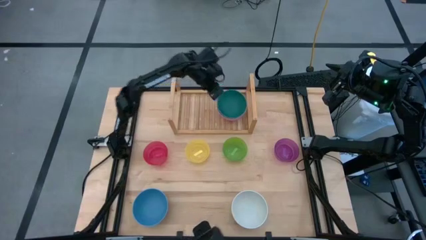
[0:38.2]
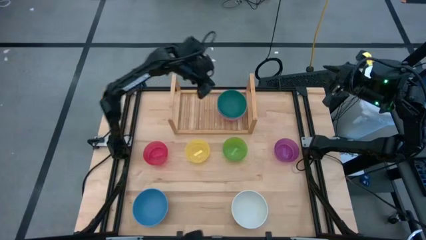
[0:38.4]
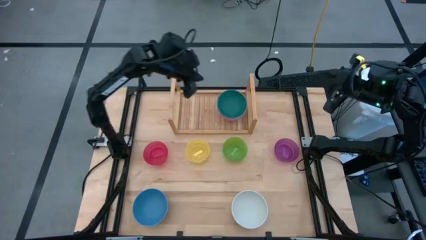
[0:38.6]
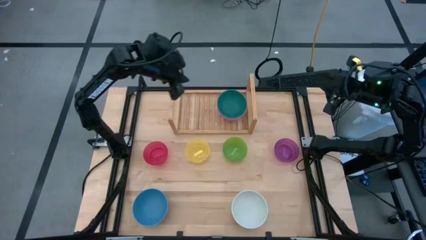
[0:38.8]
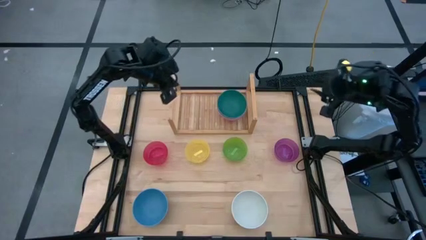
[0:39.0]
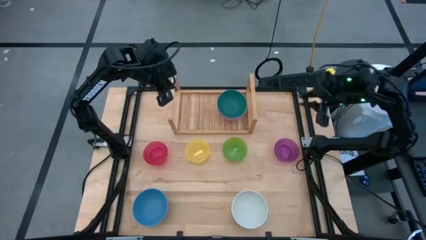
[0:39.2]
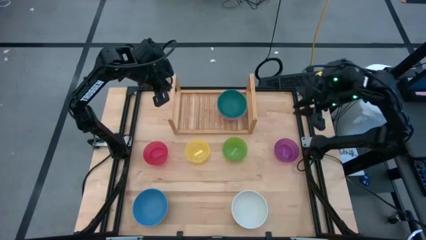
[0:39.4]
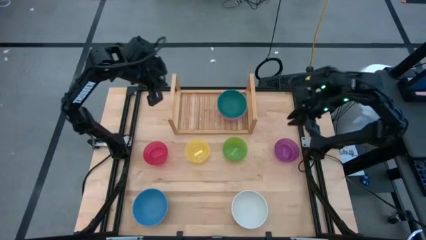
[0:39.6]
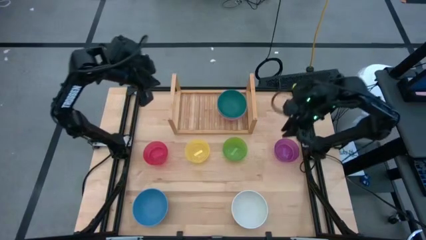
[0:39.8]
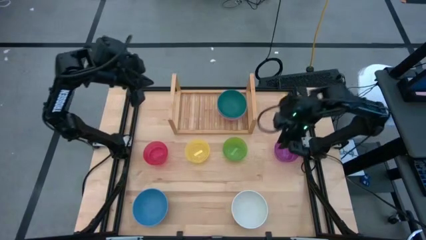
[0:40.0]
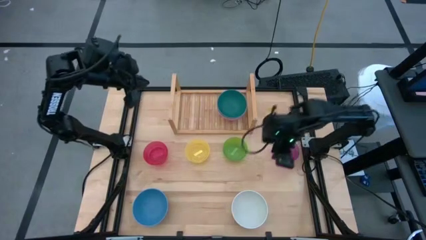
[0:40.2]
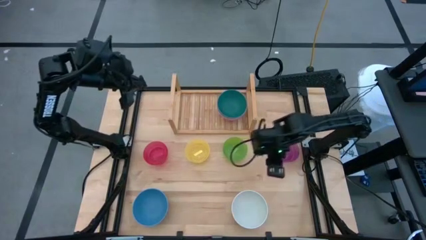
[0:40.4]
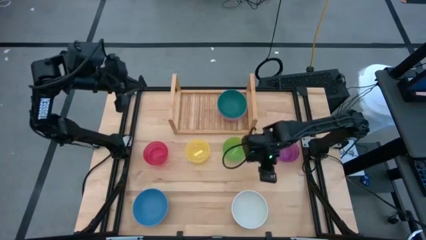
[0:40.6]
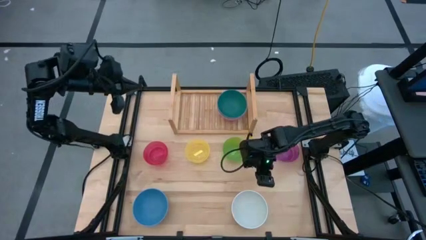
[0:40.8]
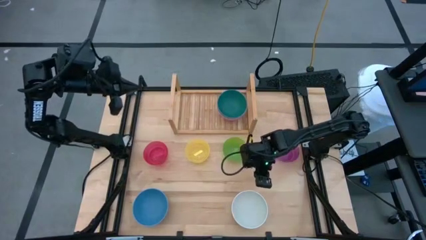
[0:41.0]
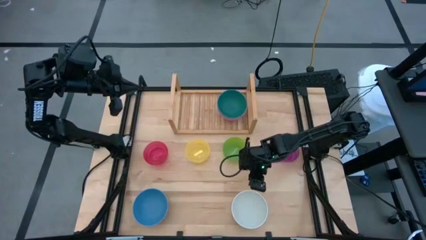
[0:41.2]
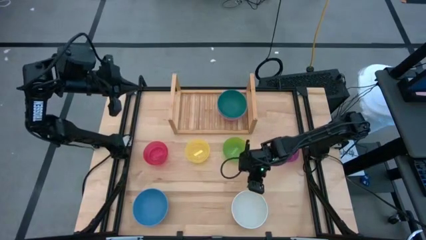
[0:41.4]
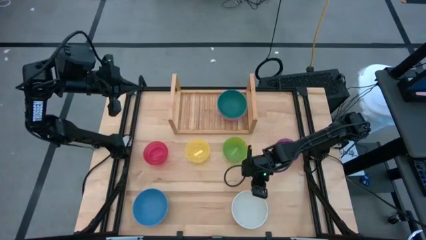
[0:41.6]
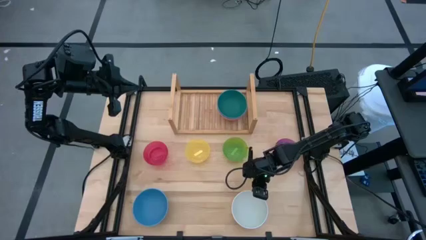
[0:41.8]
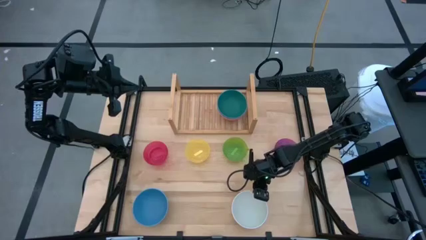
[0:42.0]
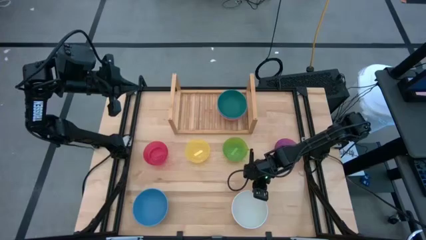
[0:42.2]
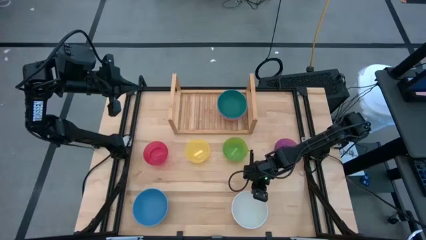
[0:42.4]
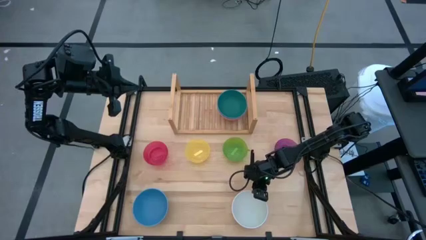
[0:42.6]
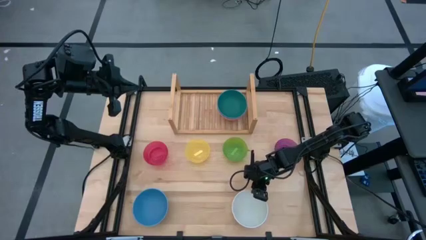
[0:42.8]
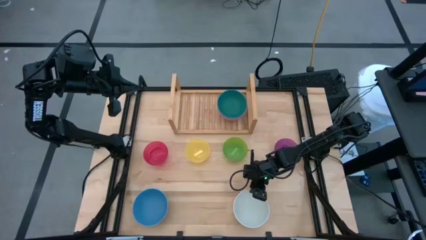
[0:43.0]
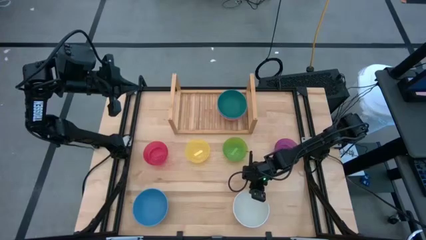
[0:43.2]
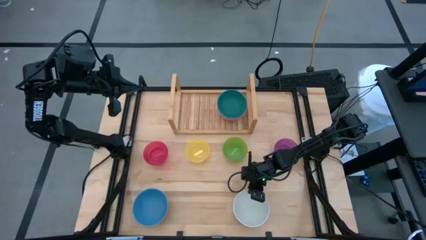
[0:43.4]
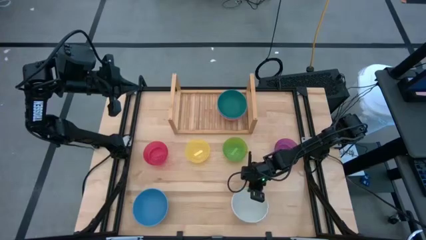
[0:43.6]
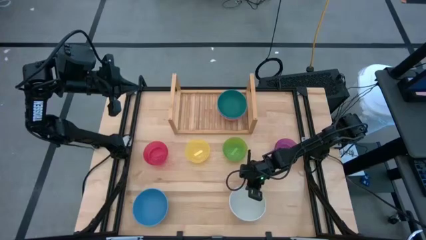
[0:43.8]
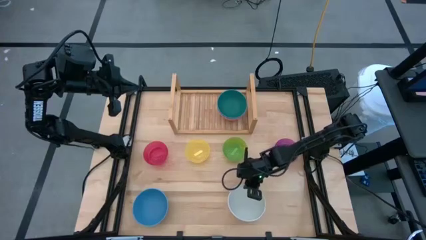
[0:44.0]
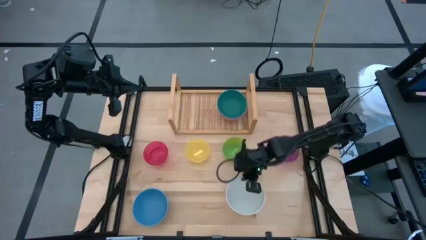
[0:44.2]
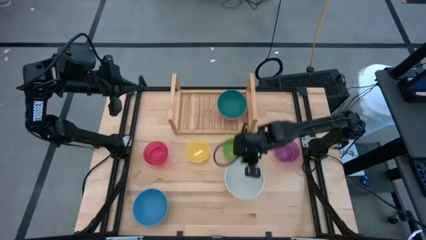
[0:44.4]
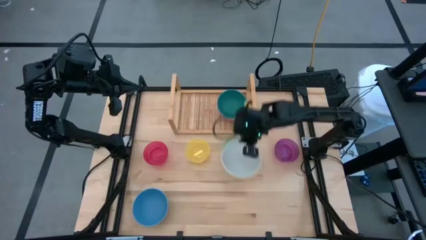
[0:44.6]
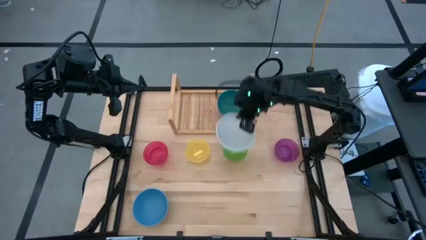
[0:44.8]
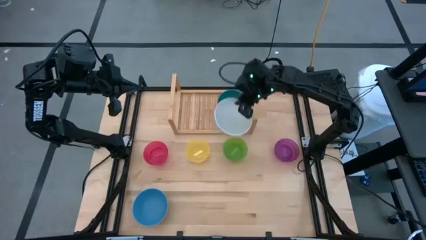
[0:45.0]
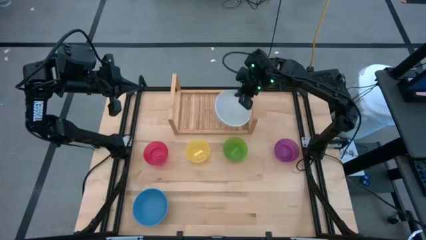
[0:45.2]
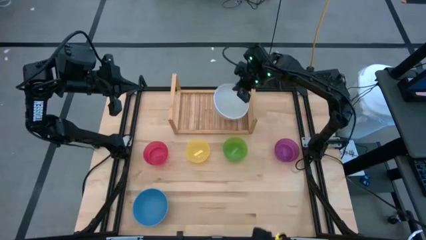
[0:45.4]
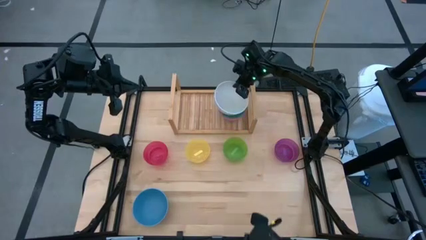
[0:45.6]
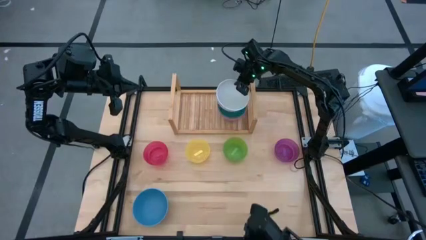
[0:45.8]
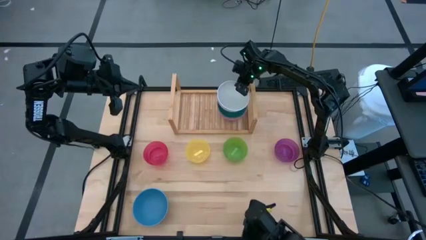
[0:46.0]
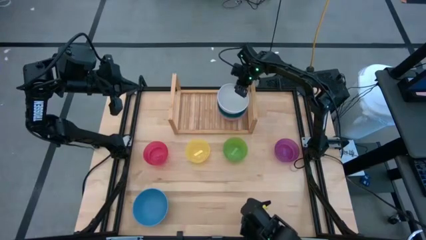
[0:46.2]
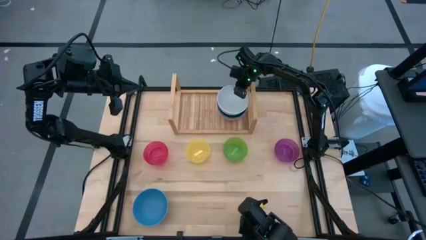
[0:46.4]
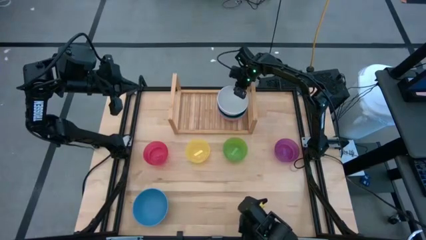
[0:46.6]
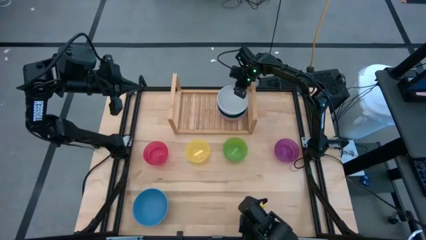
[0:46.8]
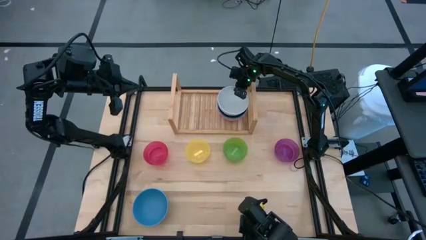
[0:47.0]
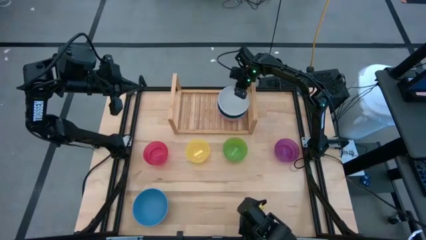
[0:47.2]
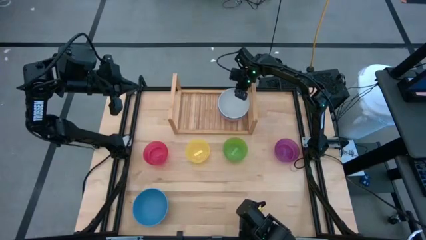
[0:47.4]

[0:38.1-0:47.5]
Task: Place and stack bowls onto a shelf
Stack the white bowl into the dark green bowl

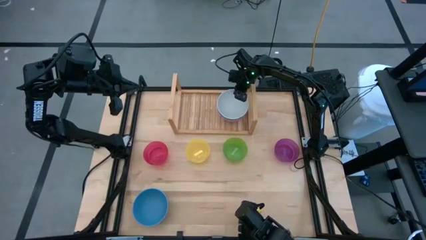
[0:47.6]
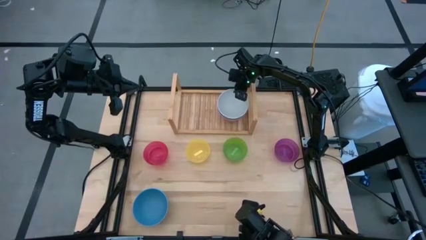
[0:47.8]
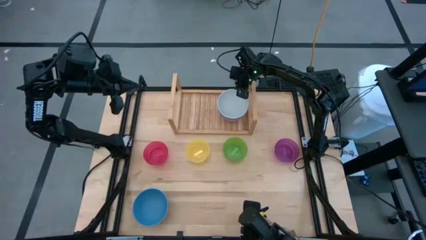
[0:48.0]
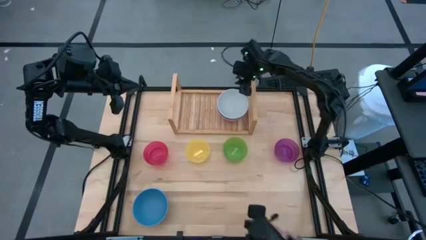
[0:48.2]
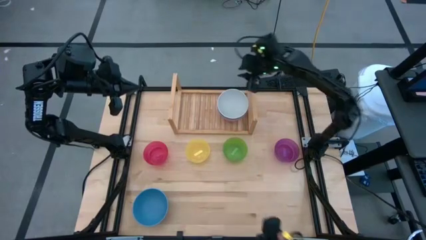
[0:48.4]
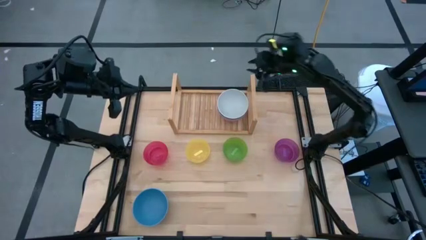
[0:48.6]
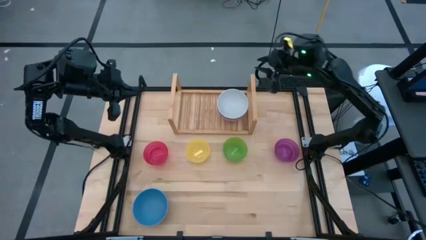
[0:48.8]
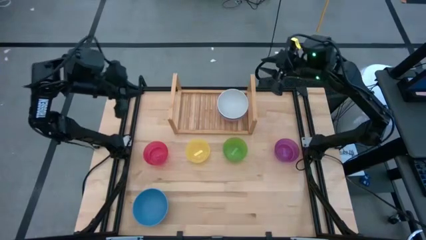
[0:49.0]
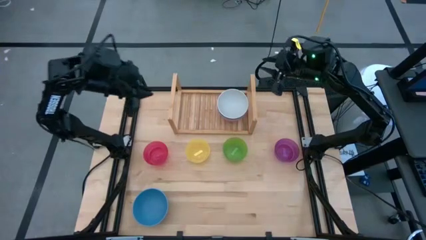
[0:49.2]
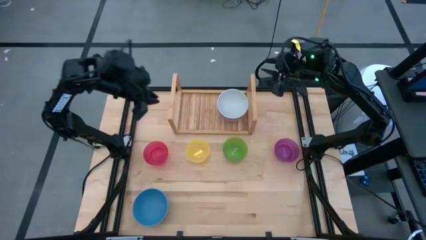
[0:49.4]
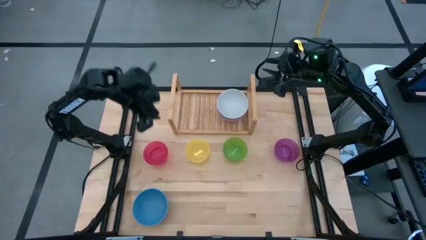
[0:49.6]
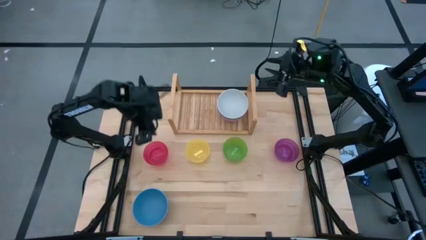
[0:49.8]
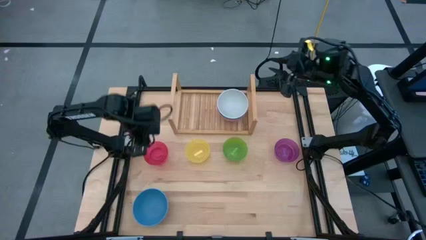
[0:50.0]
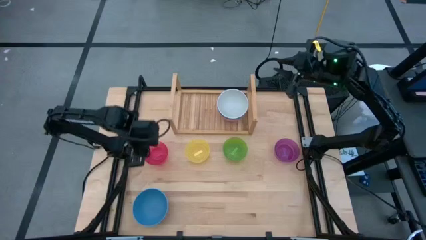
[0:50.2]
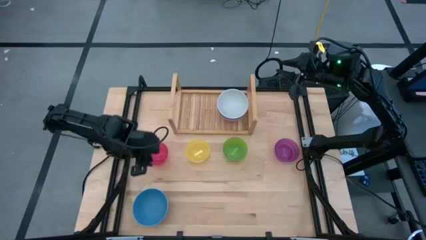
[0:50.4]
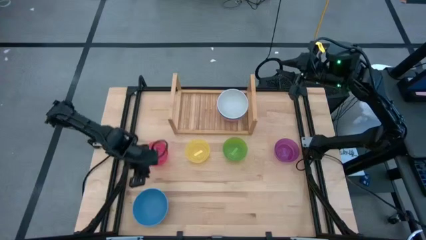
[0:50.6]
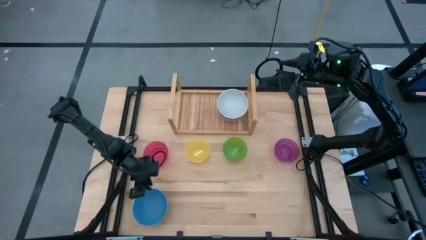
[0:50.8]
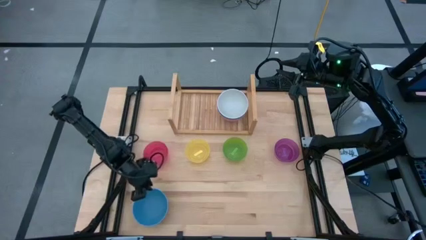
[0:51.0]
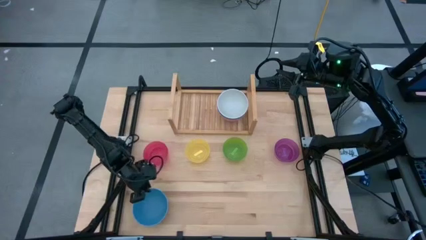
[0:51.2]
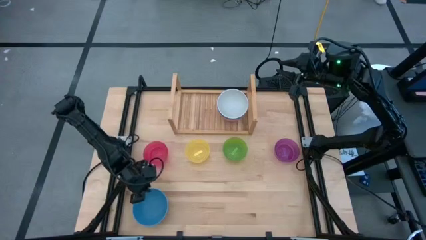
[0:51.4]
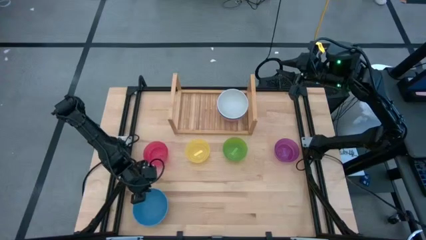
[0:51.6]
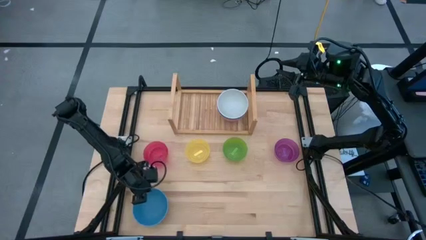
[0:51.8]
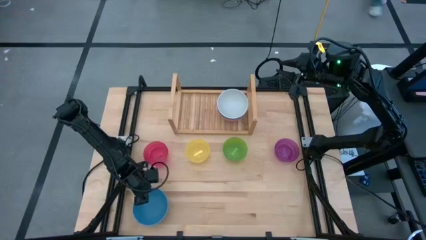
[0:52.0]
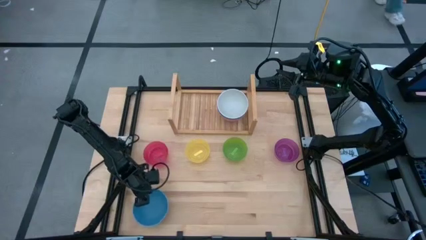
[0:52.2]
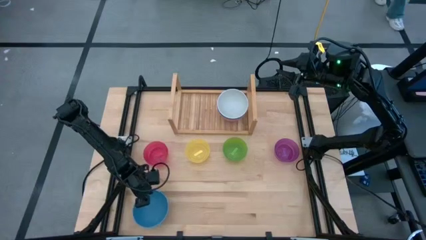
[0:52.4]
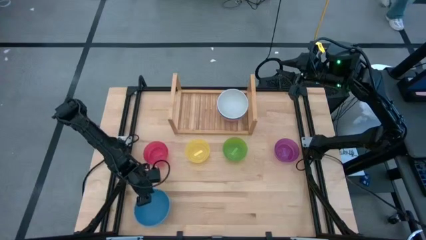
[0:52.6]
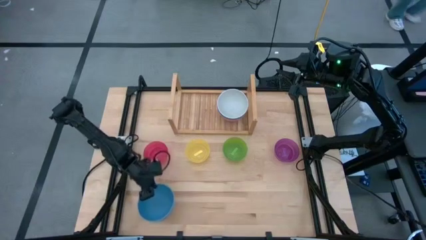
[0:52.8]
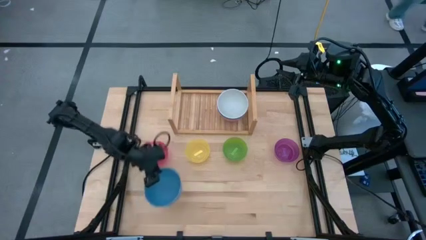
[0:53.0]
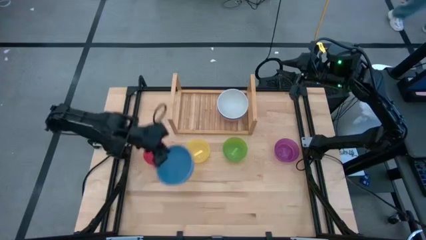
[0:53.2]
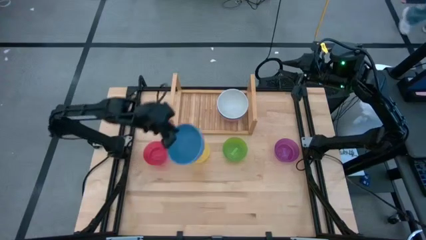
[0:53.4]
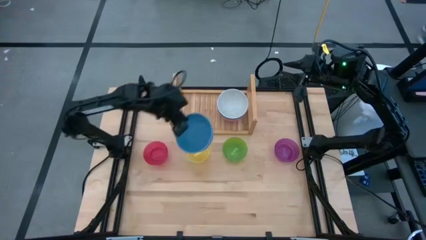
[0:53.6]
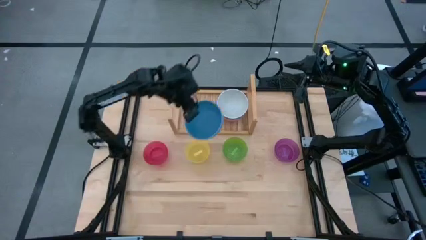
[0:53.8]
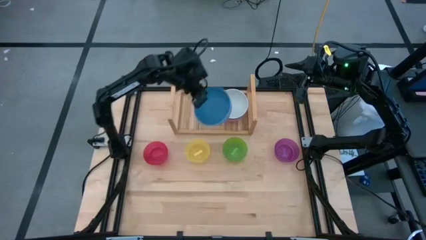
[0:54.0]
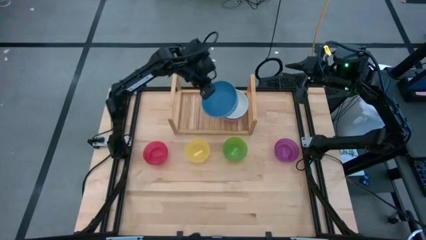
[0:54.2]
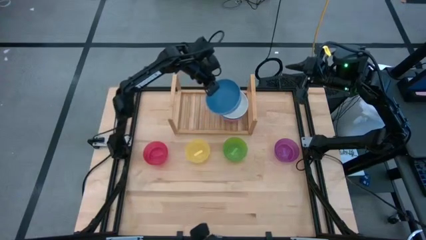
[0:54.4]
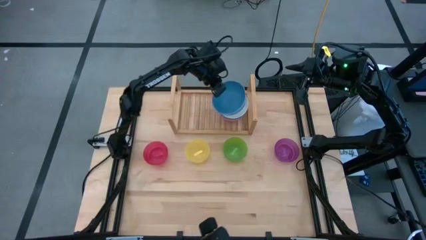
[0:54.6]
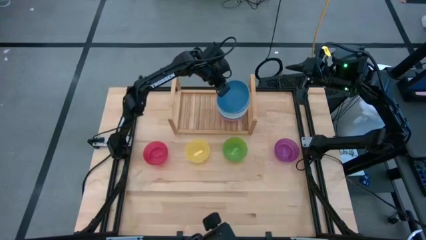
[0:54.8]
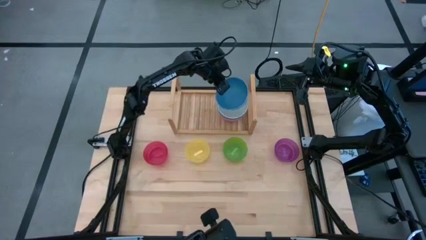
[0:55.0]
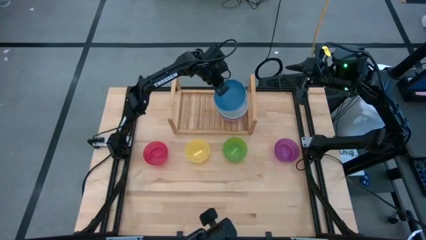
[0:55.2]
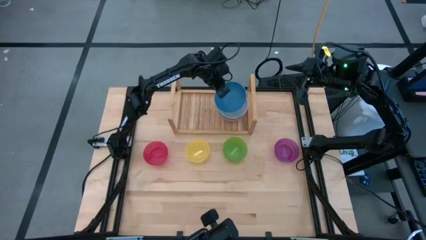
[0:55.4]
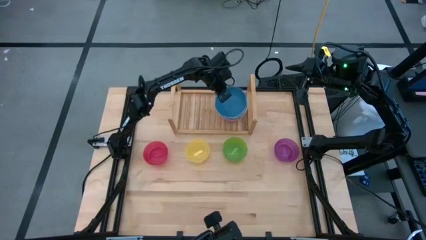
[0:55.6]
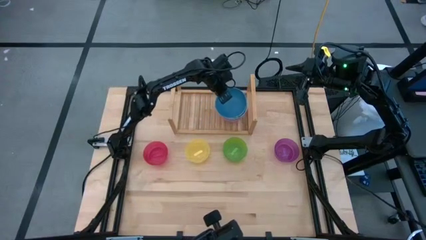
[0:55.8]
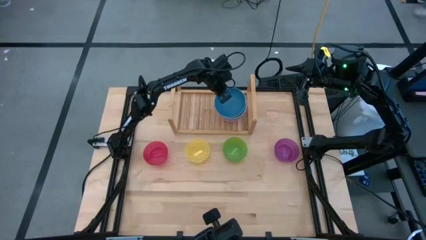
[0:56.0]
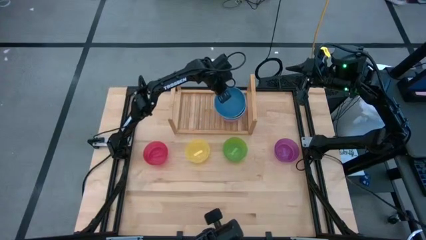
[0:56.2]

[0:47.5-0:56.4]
Stack the blue bowl into the white bowl on the shelf
